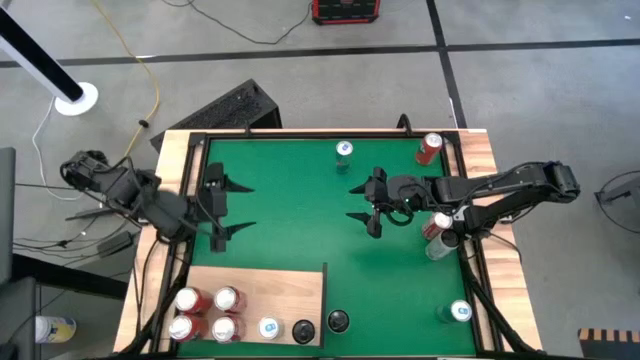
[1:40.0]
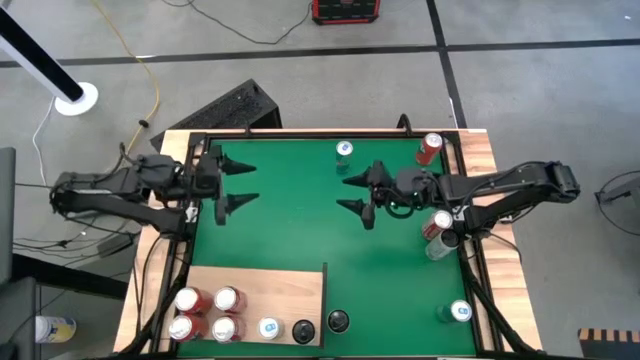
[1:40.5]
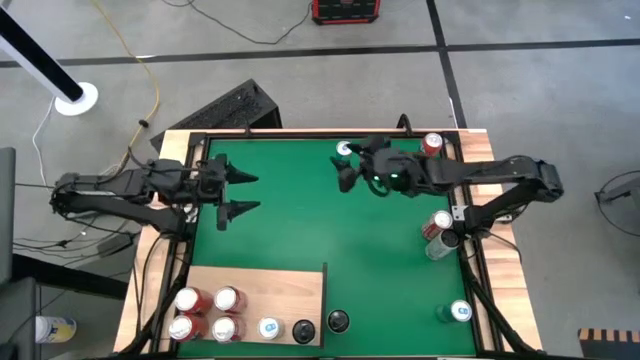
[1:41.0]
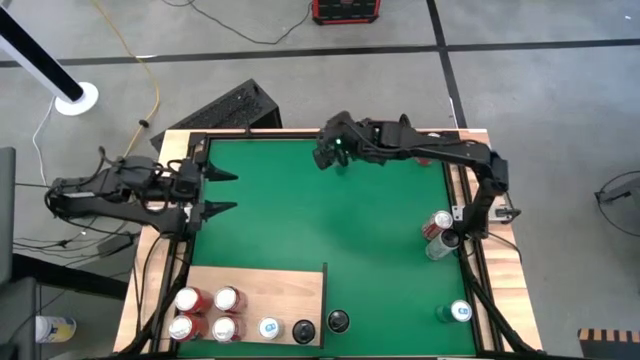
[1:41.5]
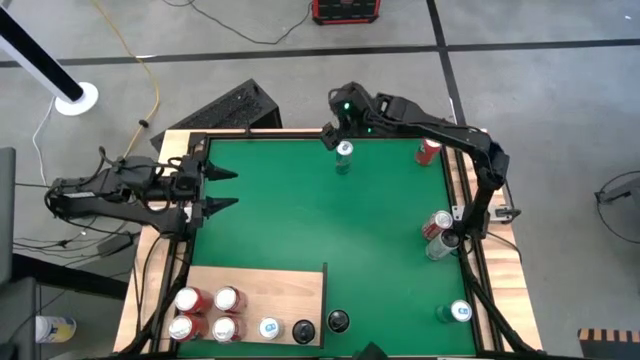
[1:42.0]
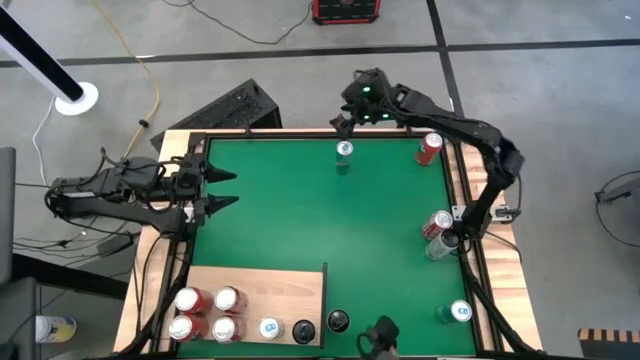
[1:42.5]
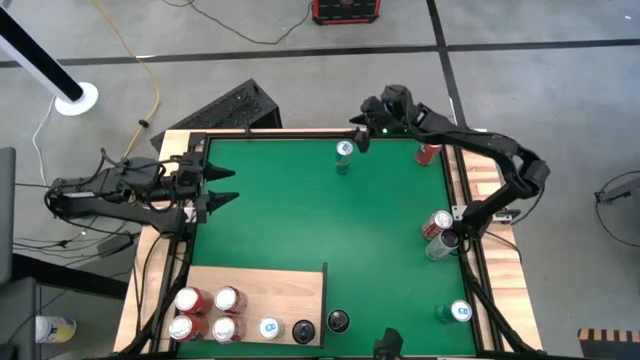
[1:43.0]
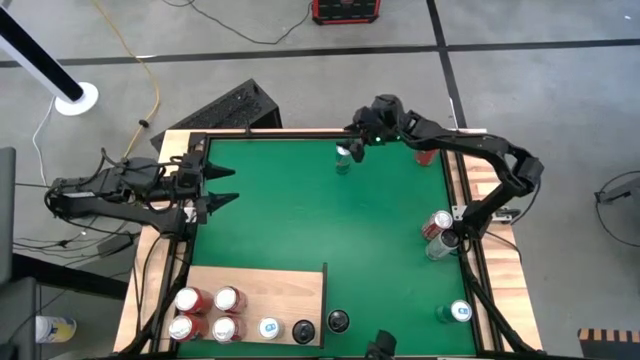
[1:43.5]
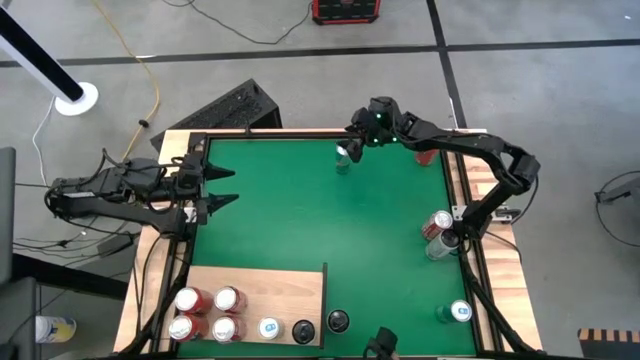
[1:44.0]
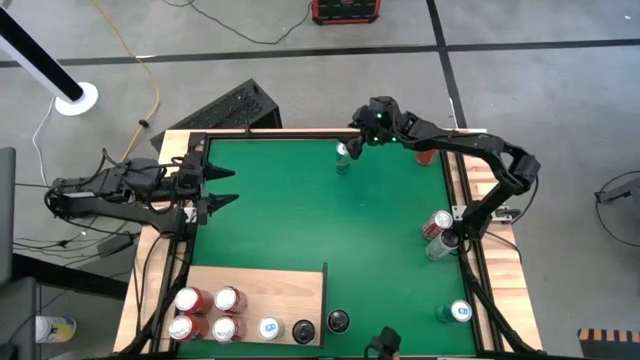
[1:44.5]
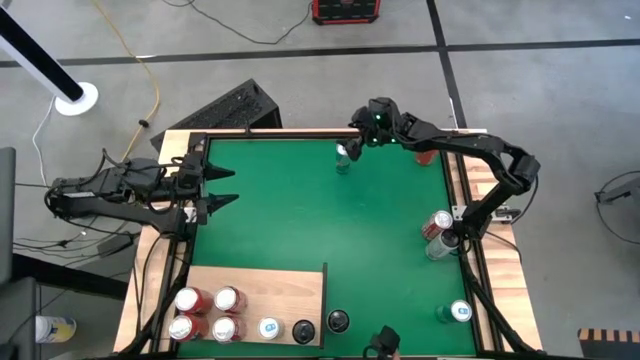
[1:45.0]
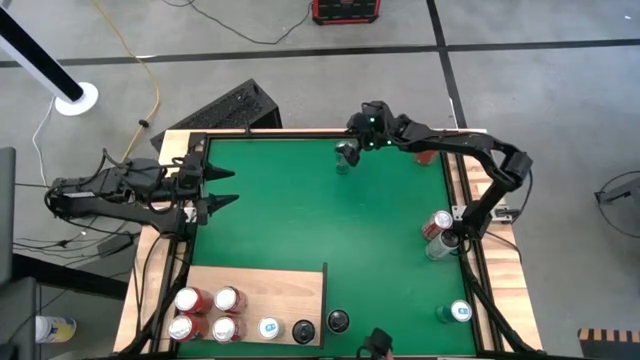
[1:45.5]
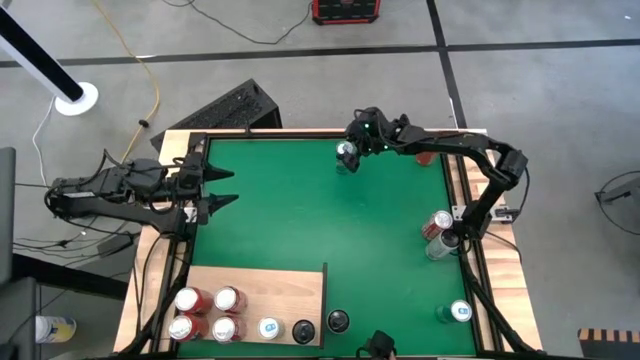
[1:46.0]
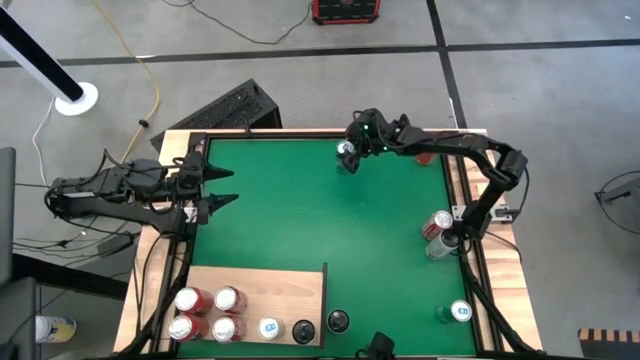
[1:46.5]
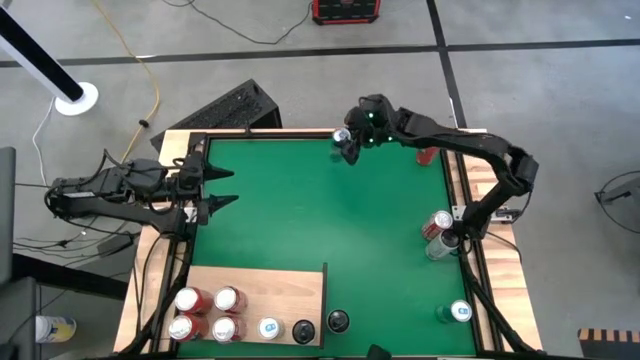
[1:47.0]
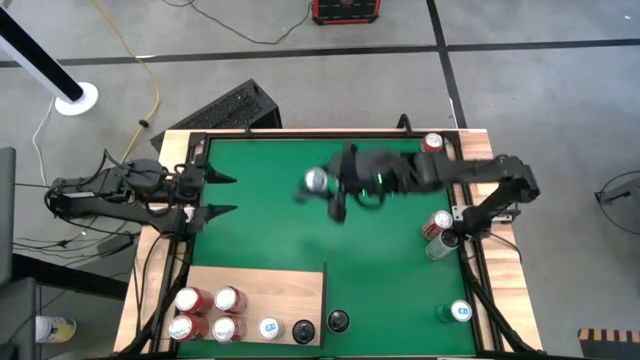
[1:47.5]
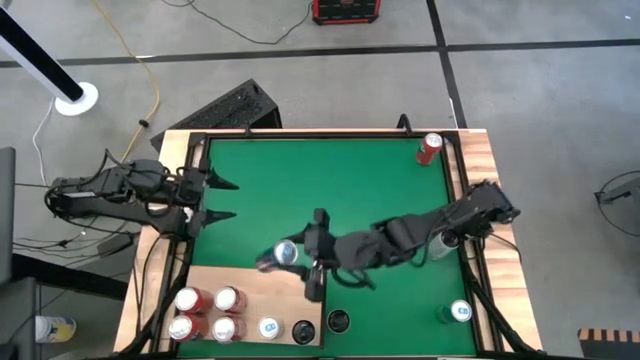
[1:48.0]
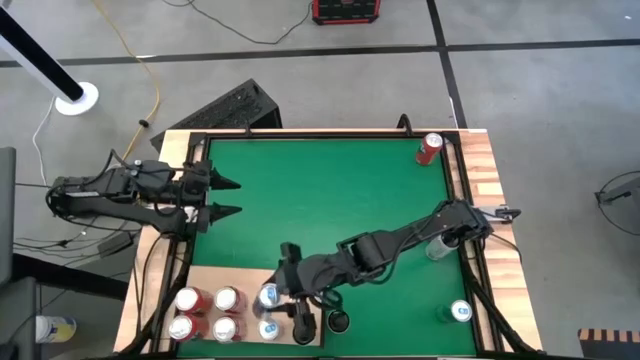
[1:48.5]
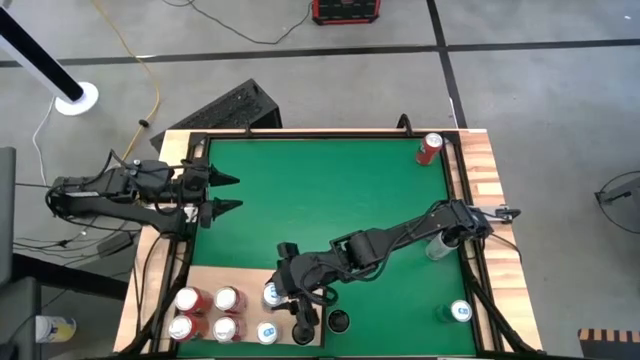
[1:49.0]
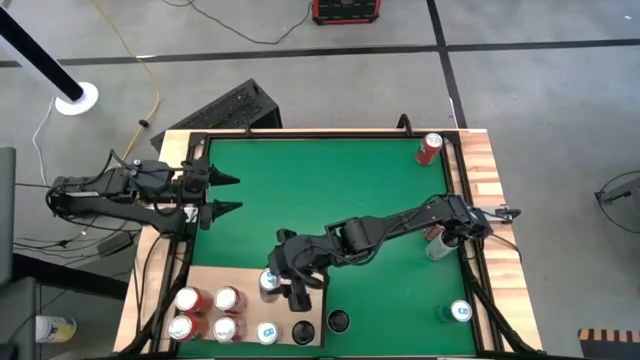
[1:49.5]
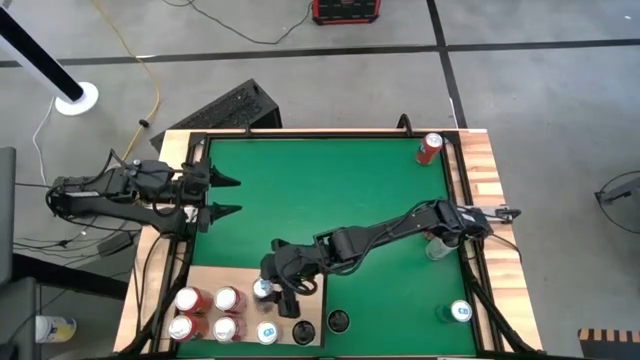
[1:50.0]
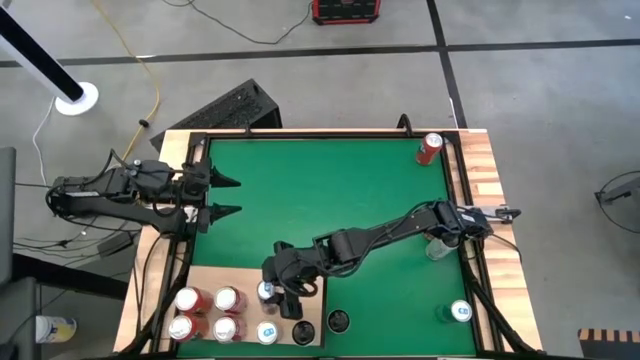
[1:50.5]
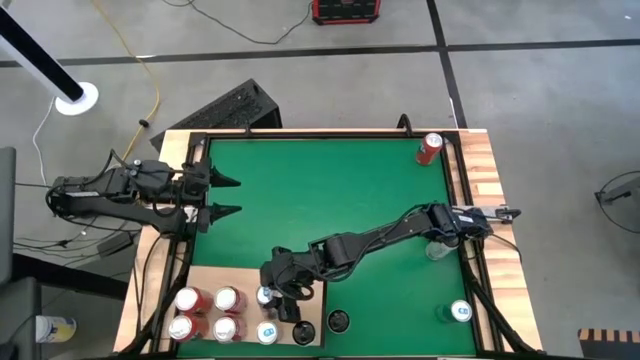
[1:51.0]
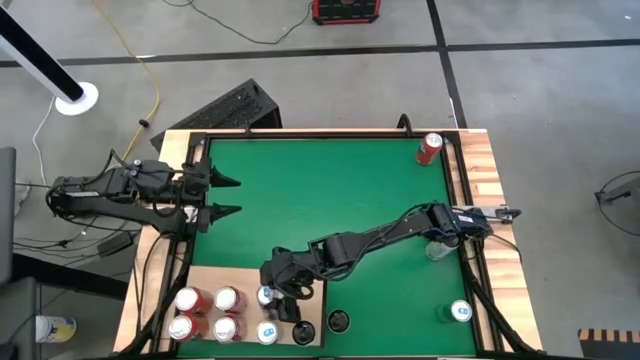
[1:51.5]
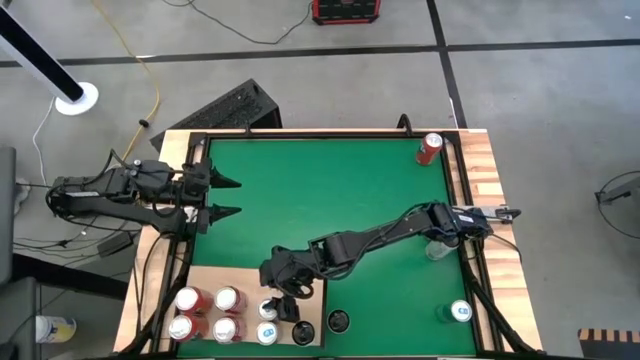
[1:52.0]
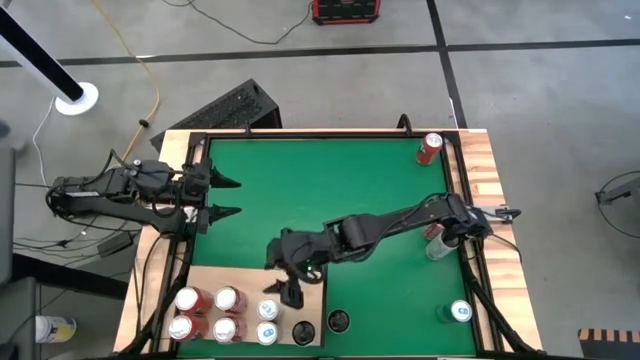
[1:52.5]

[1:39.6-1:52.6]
Task: Place canned beverage on shelf
Put the top blue soda can on the shelf aligned with the other blue soda can

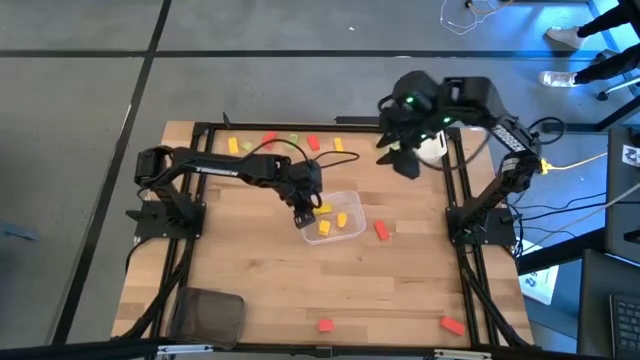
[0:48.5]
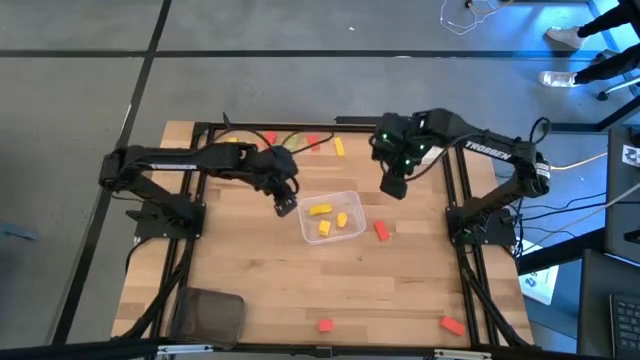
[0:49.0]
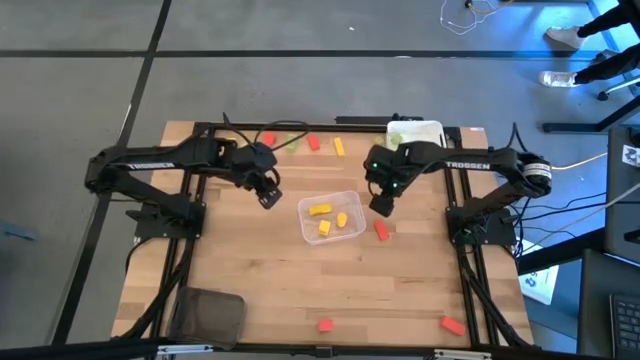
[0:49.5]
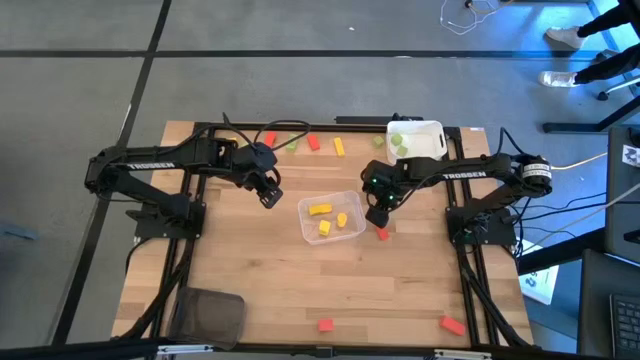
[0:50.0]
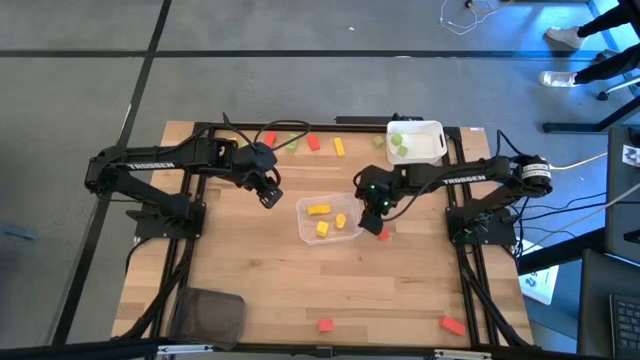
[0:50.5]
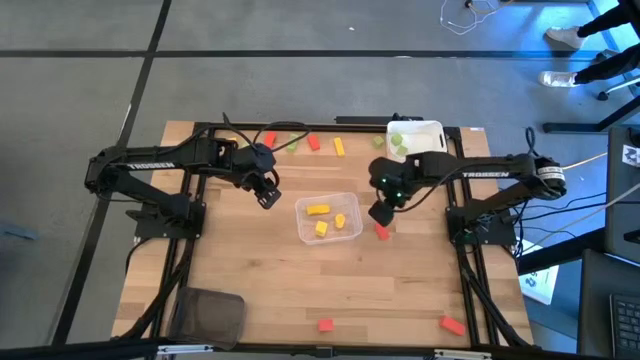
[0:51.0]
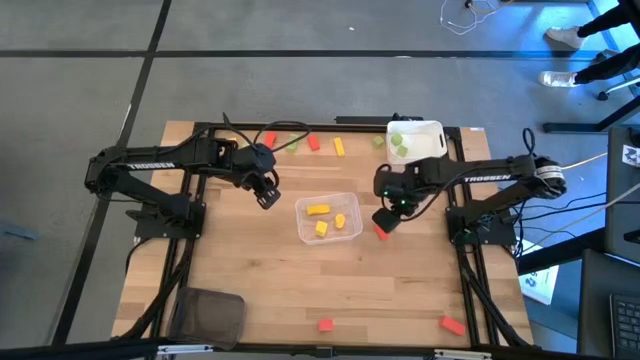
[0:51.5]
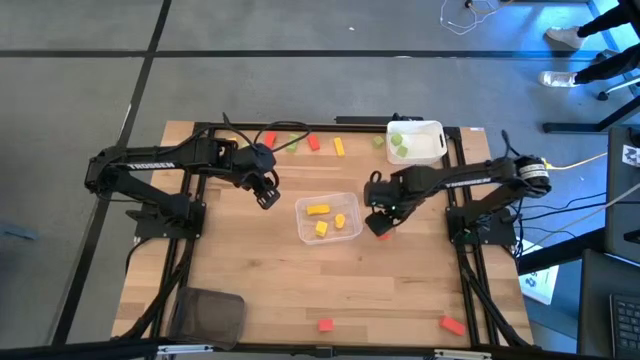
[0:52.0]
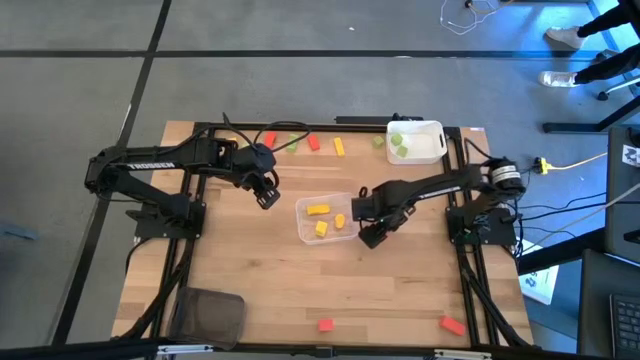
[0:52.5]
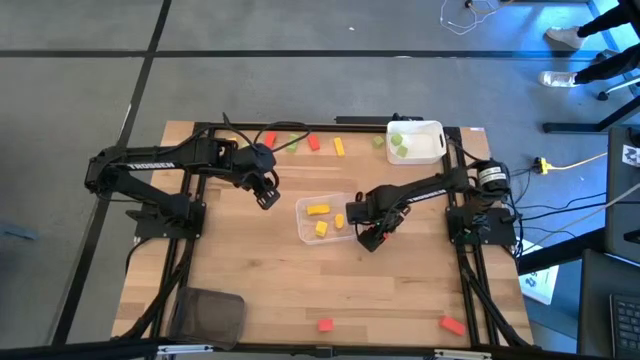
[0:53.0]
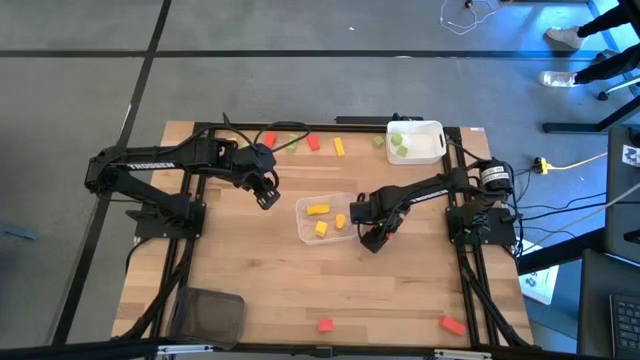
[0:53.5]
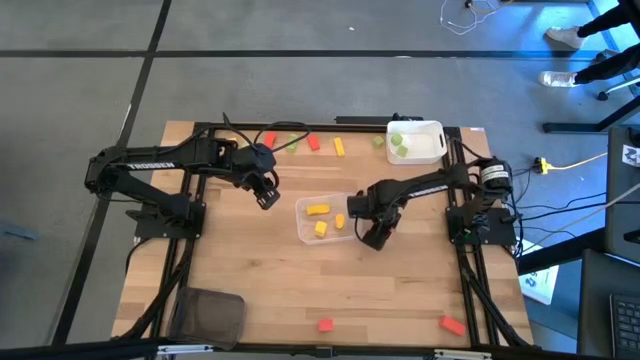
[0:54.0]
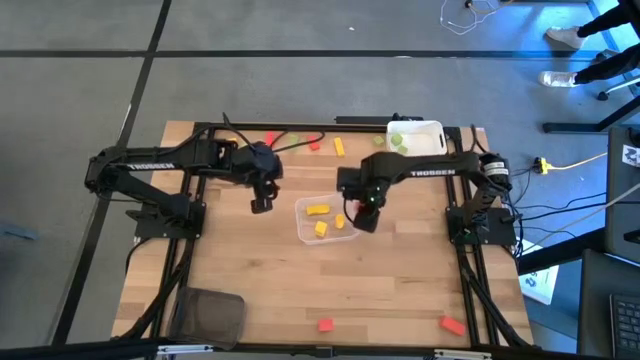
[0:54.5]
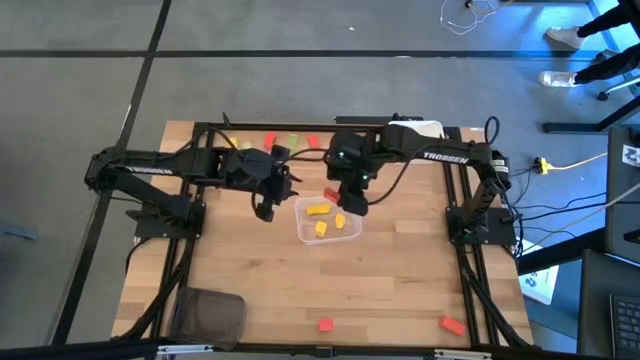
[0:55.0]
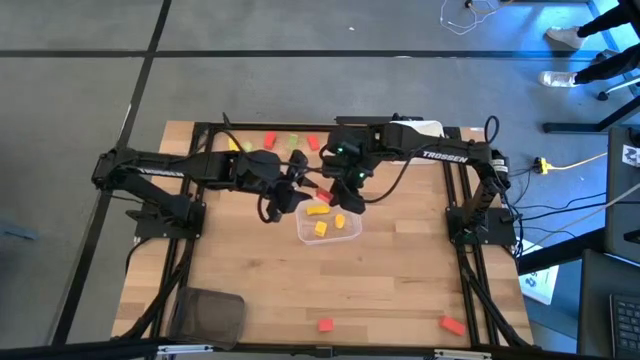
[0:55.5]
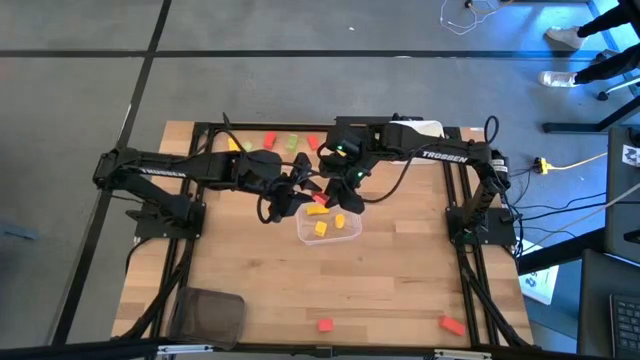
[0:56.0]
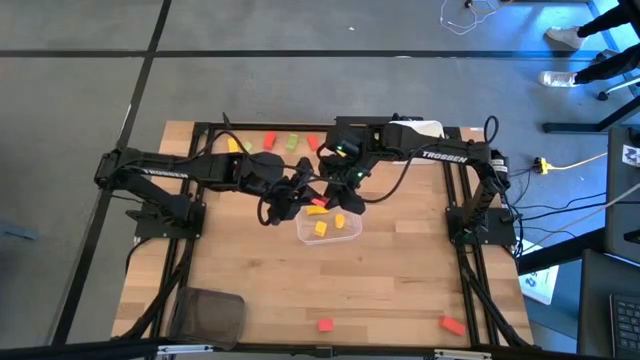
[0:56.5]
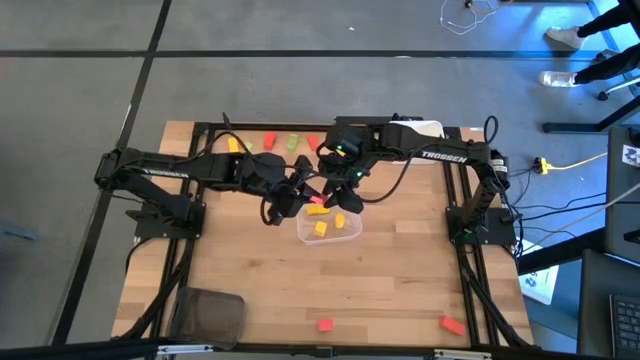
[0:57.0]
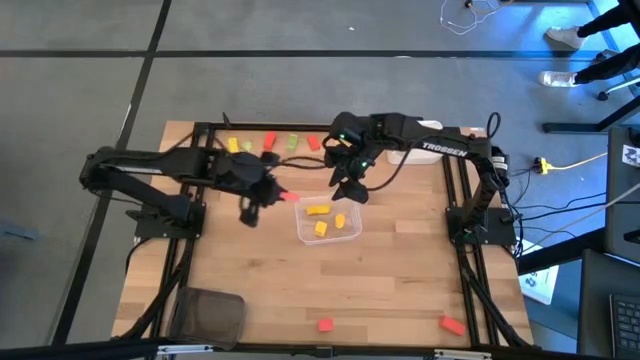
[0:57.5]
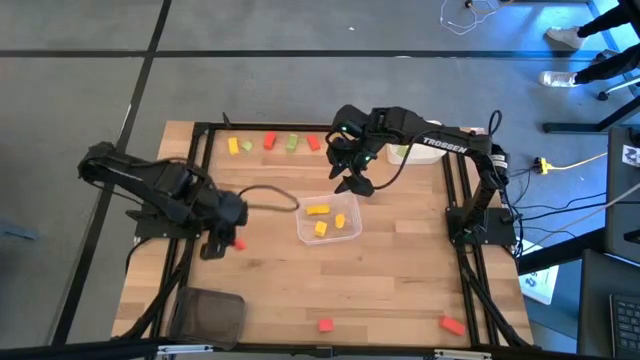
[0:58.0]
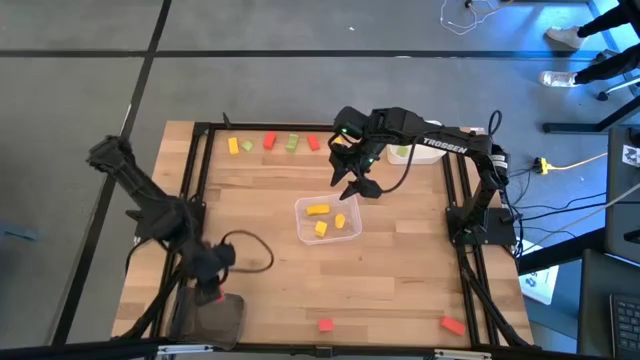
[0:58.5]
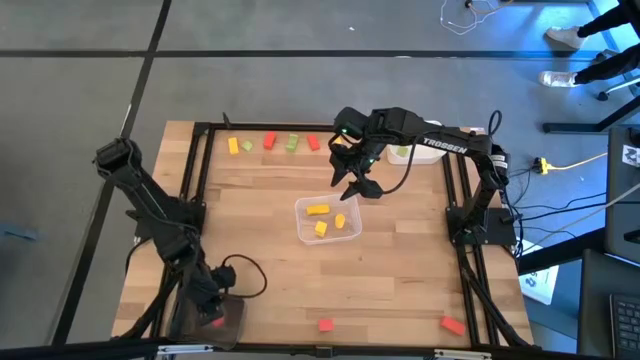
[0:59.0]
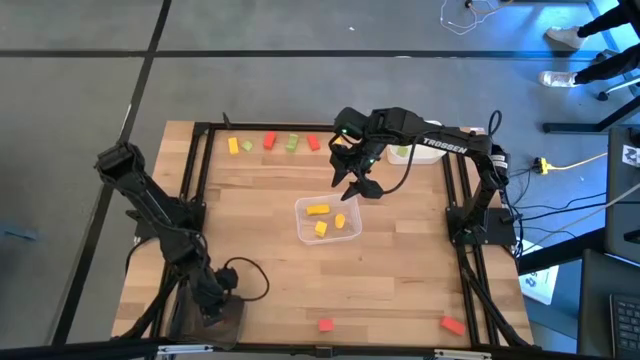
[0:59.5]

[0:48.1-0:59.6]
Task: Sort & place blocks by color
Put the orange block into the black bin
